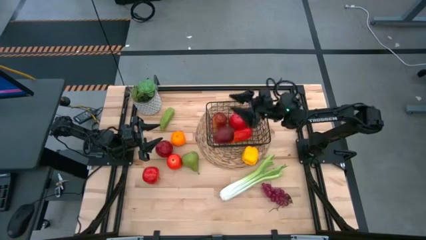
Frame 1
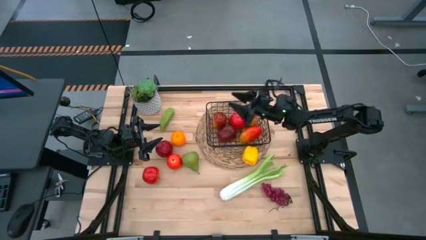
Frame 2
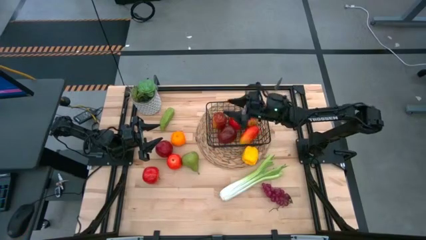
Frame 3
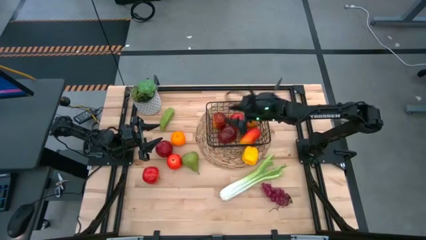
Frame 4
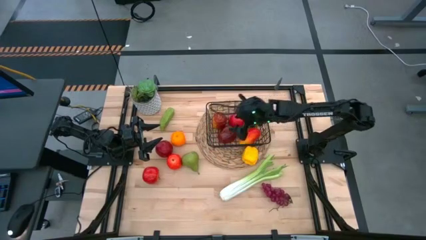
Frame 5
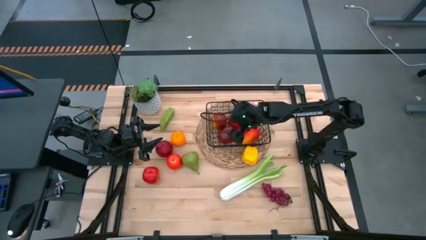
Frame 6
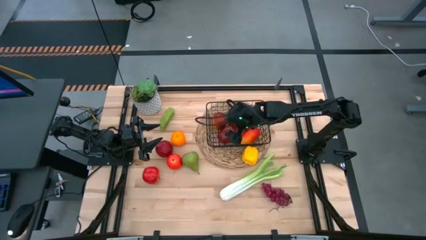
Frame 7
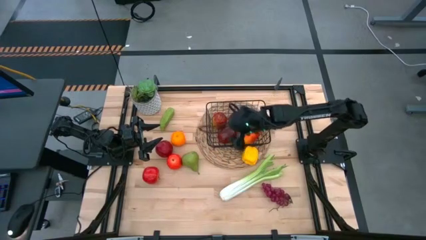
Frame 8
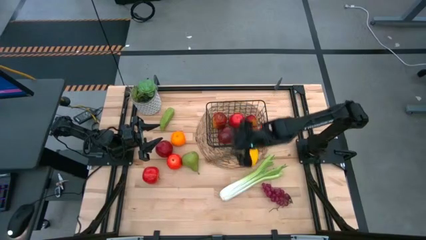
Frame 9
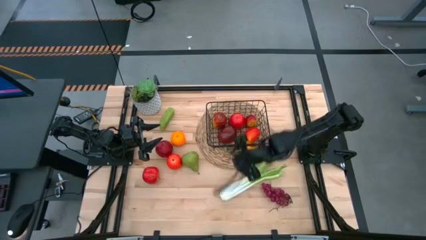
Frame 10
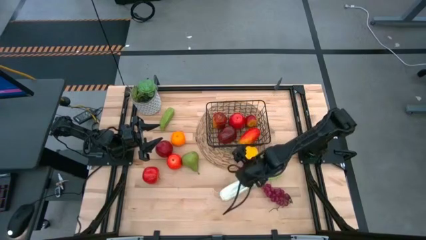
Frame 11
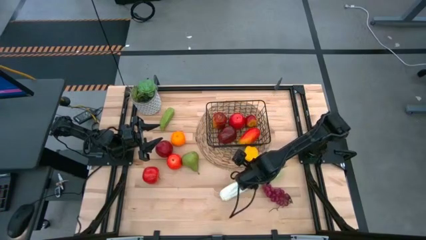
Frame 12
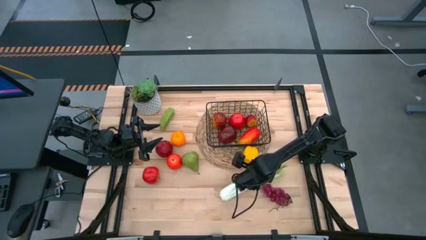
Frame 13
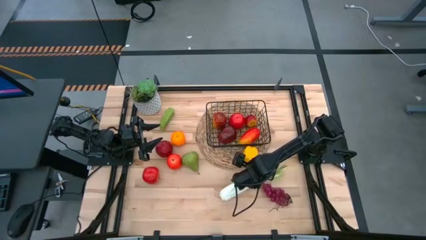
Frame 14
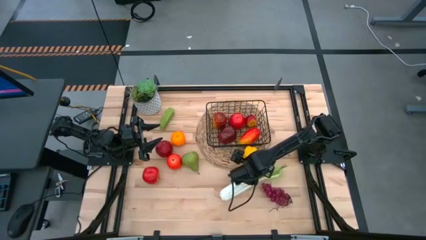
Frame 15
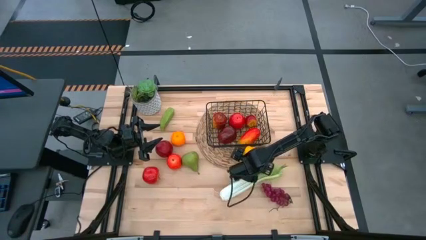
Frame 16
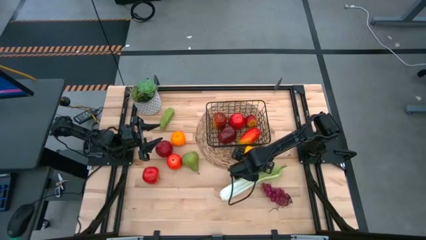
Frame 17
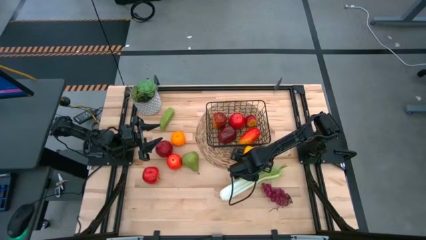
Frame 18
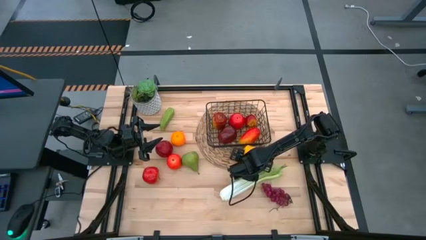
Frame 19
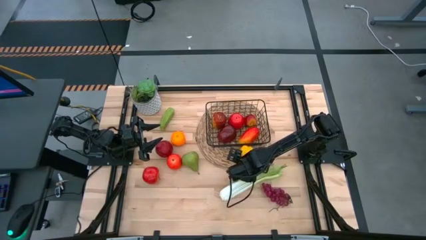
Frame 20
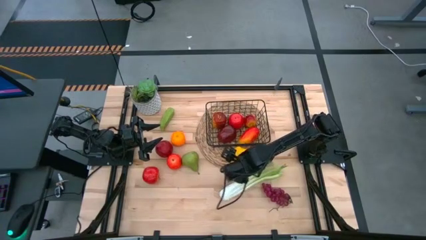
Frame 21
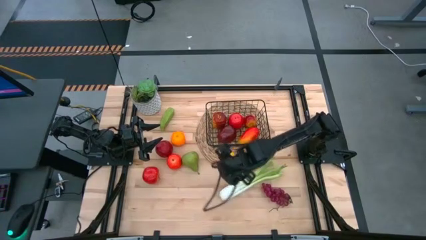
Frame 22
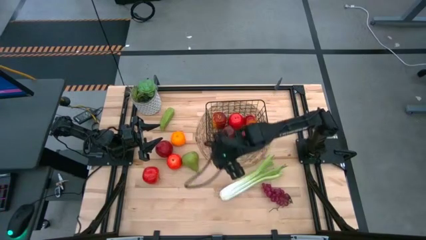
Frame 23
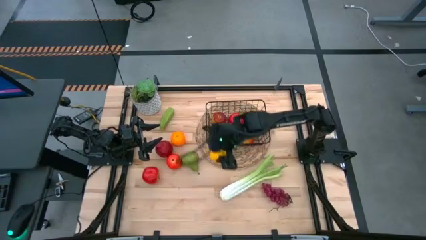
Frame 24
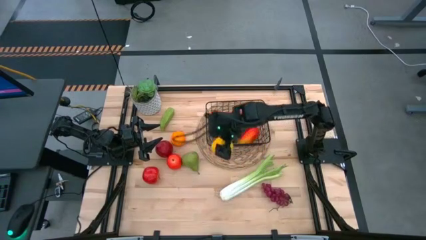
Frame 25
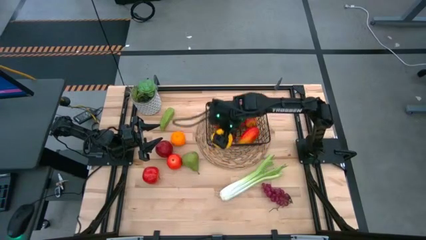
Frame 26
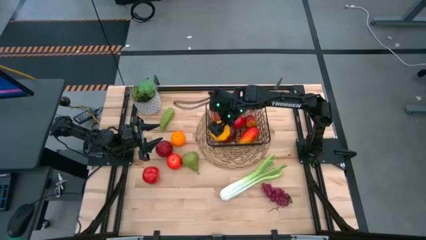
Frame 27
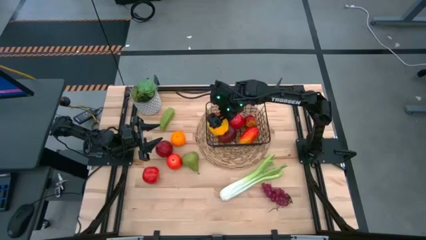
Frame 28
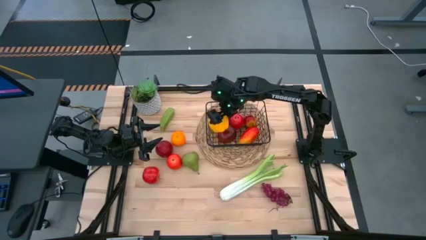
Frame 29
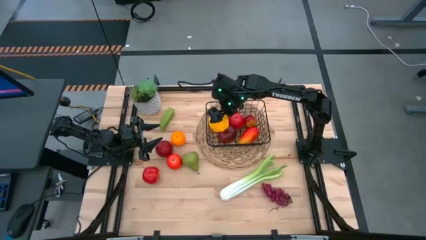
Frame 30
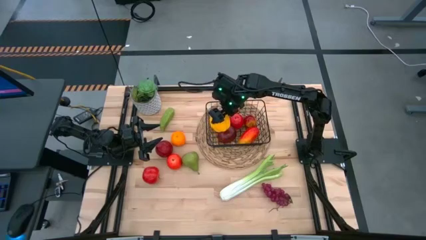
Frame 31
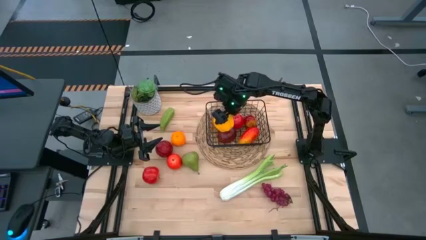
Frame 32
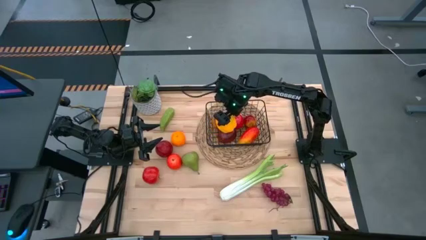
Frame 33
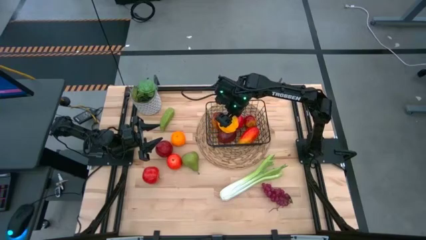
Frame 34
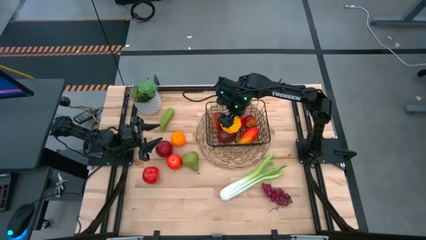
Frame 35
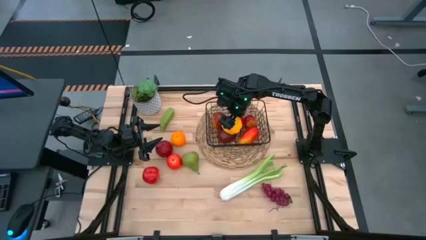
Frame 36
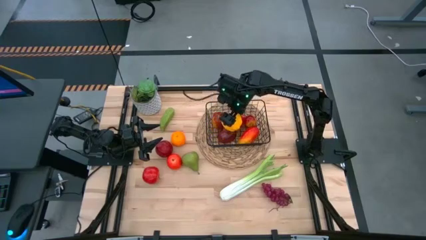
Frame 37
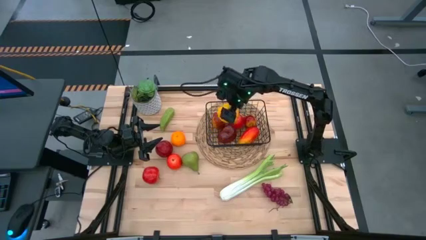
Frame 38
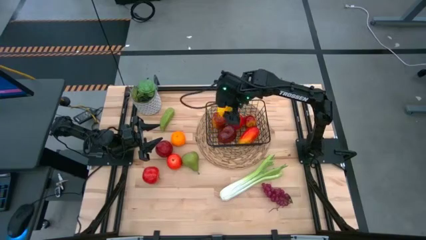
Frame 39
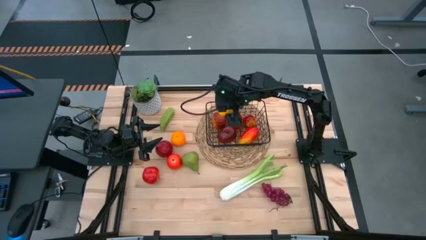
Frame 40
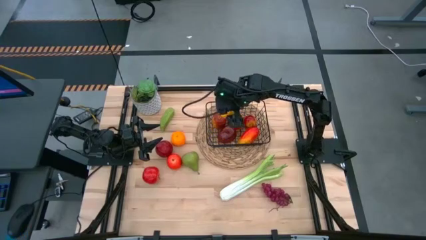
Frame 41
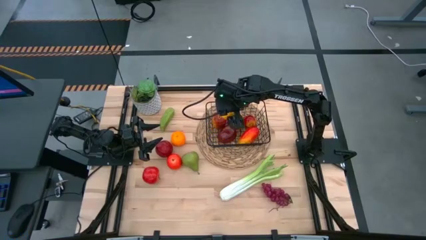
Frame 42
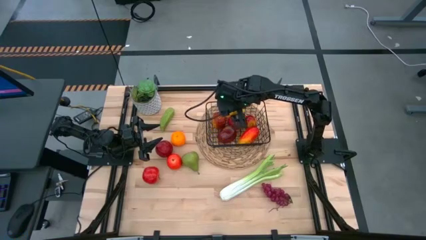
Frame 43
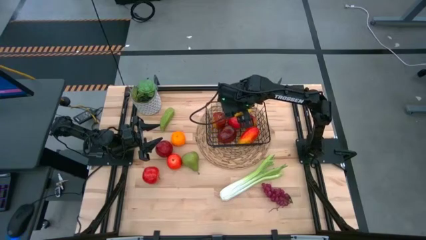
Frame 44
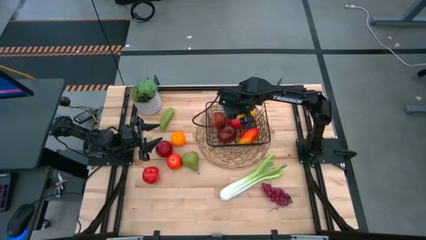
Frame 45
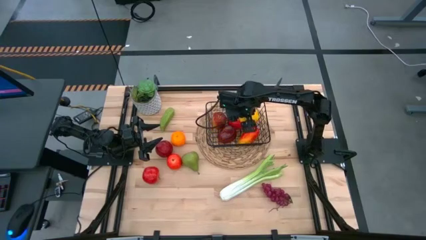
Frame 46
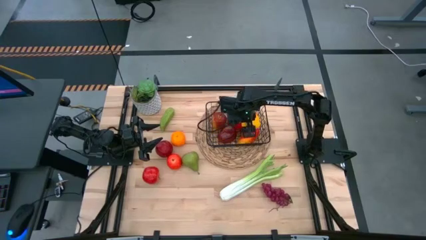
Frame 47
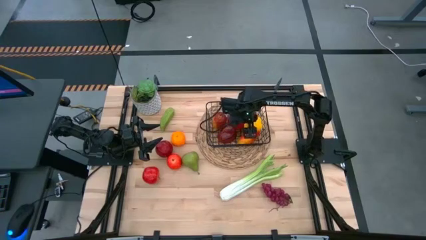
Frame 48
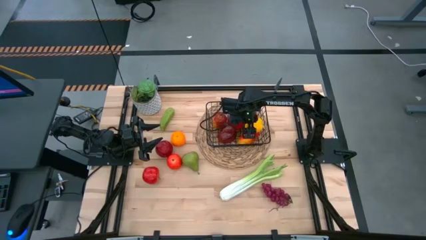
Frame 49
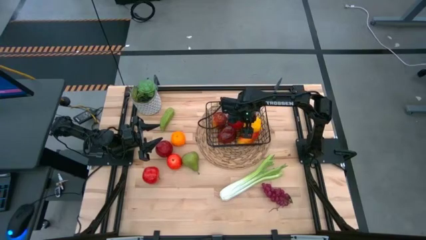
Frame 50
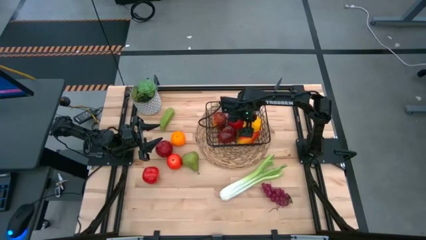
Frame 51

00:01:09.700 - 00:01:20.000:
Task: Build produce basket
Put the yellow pepper into the black wire basket

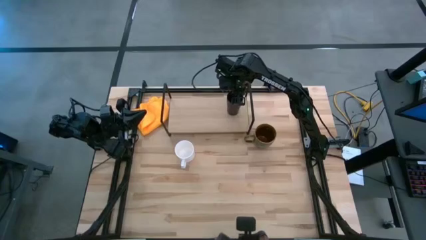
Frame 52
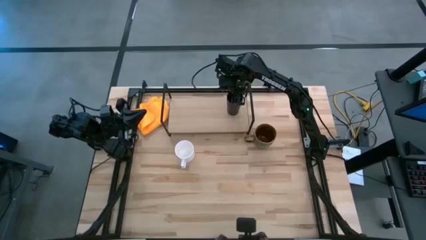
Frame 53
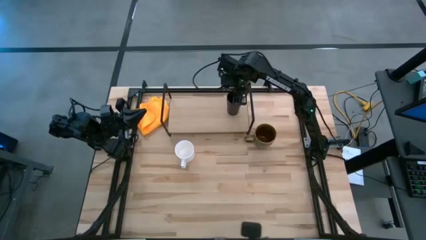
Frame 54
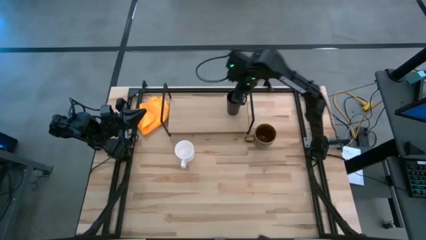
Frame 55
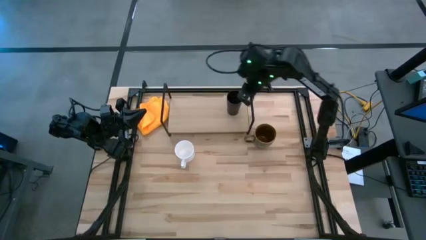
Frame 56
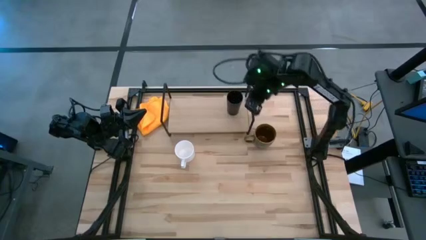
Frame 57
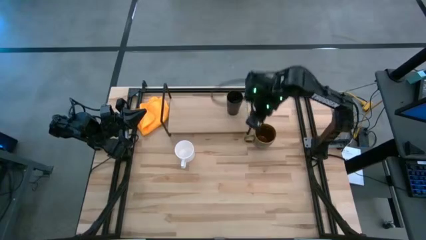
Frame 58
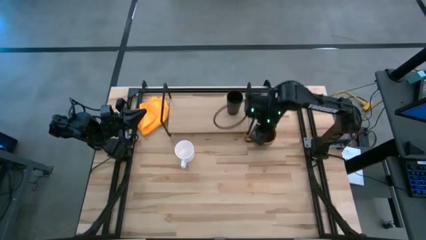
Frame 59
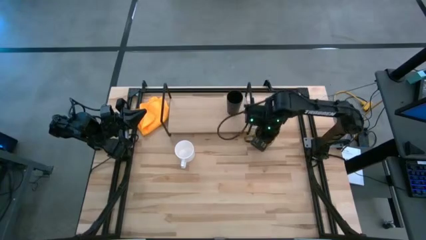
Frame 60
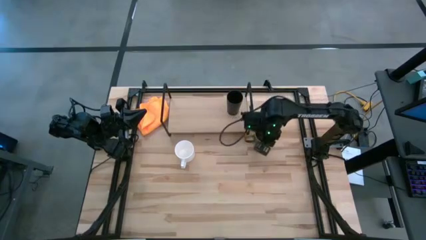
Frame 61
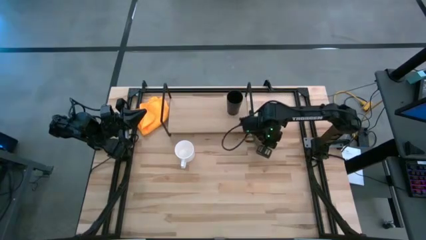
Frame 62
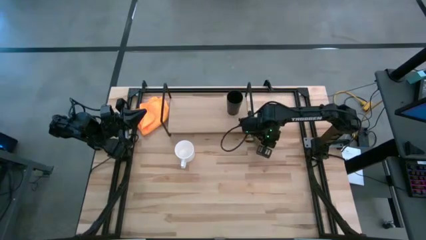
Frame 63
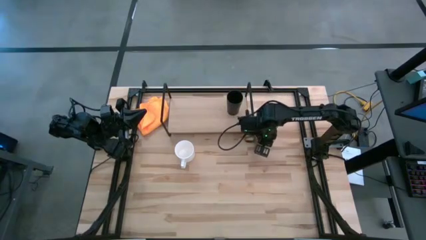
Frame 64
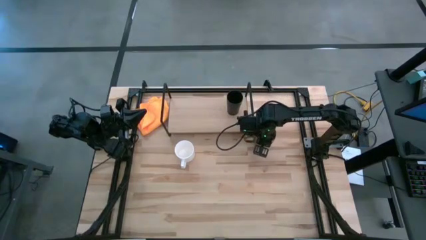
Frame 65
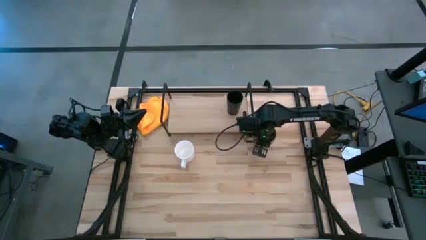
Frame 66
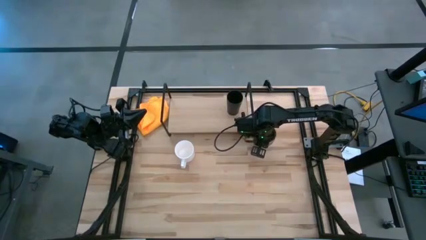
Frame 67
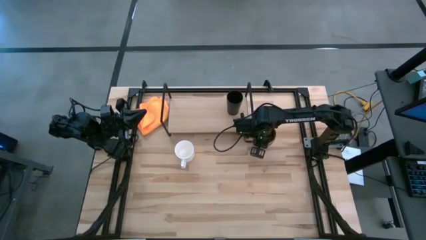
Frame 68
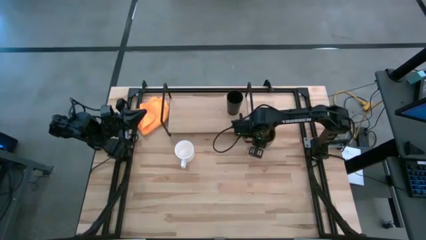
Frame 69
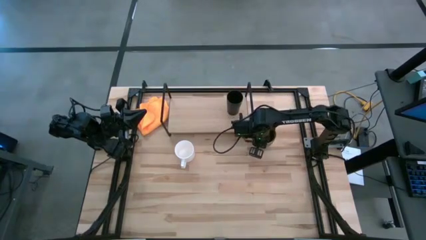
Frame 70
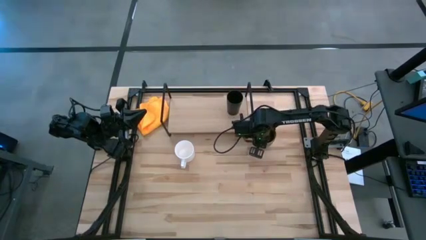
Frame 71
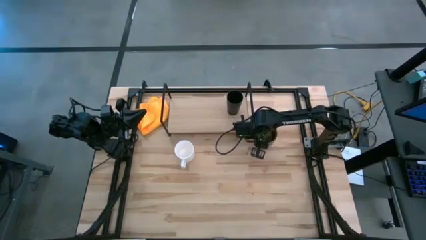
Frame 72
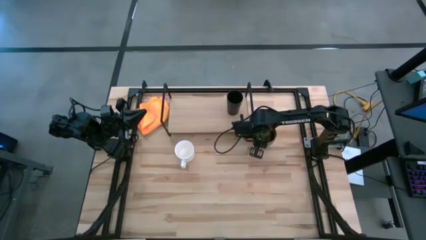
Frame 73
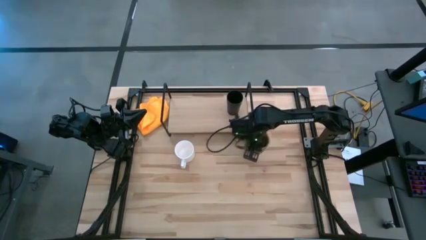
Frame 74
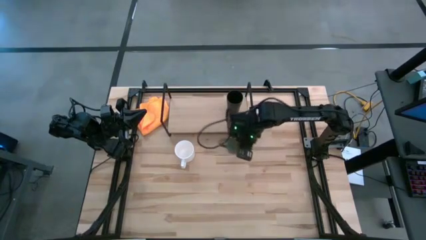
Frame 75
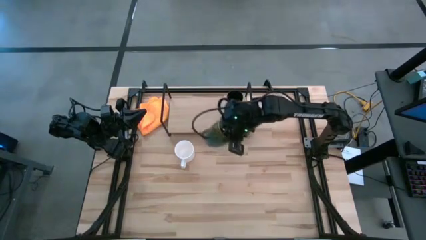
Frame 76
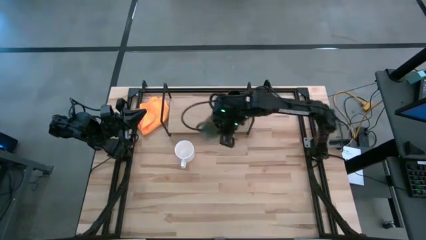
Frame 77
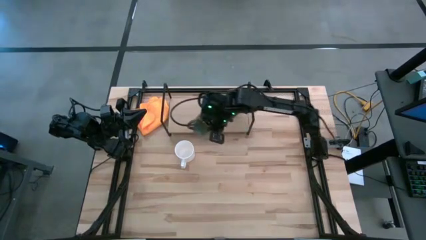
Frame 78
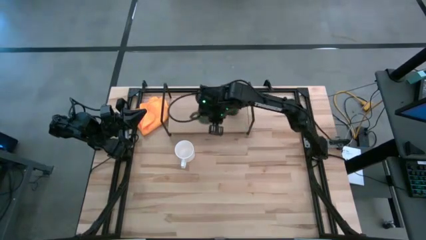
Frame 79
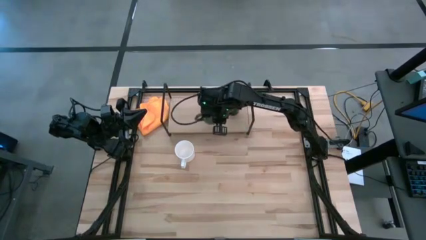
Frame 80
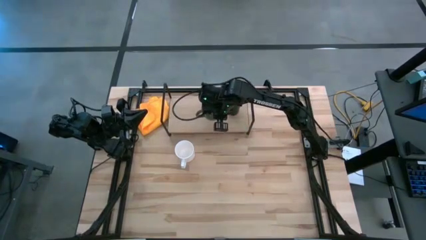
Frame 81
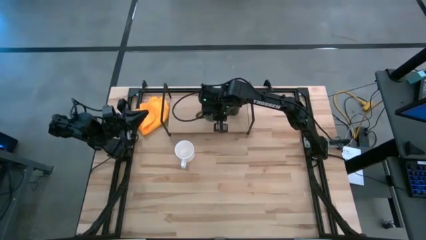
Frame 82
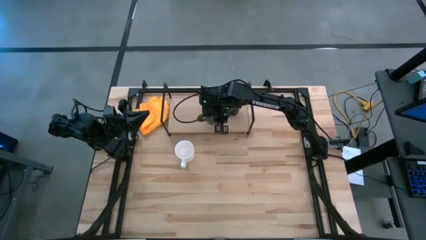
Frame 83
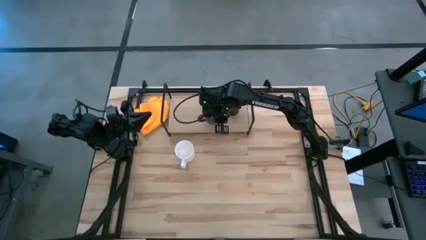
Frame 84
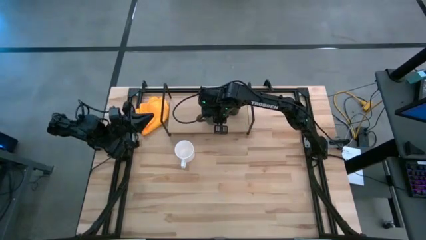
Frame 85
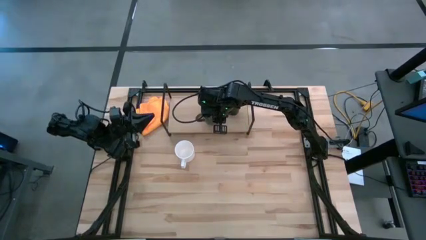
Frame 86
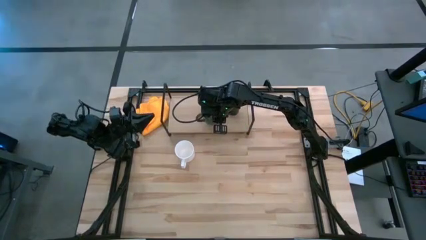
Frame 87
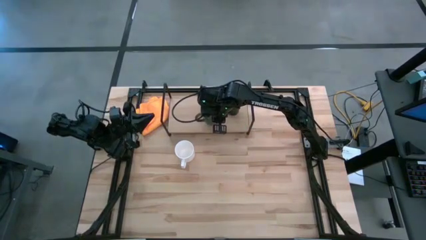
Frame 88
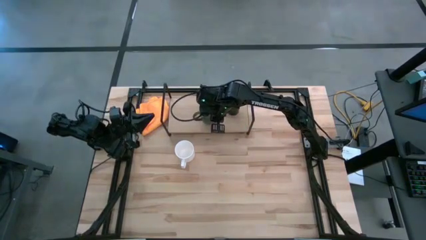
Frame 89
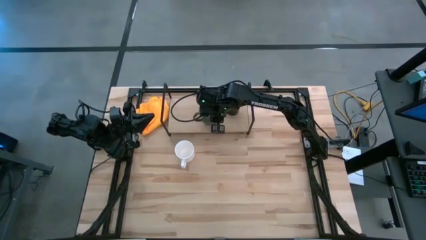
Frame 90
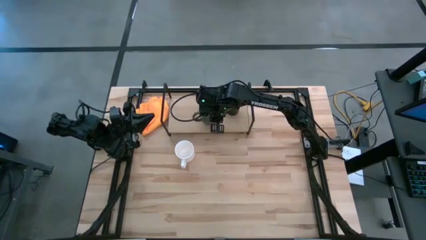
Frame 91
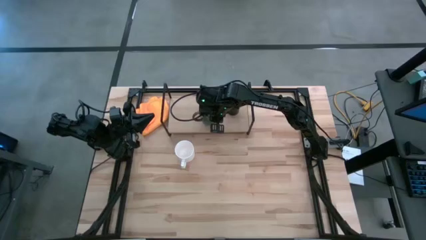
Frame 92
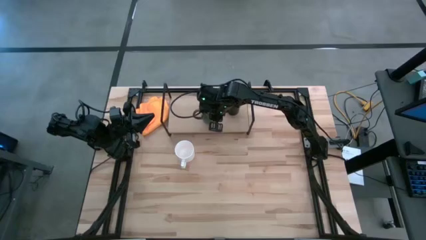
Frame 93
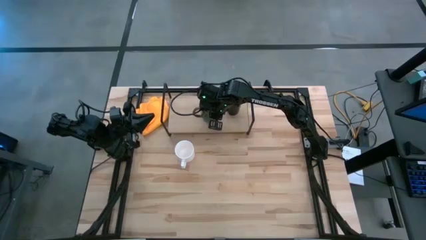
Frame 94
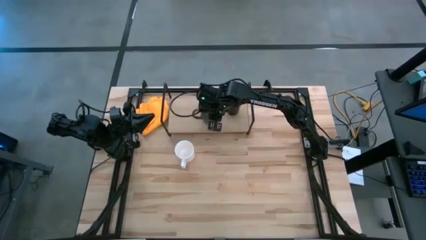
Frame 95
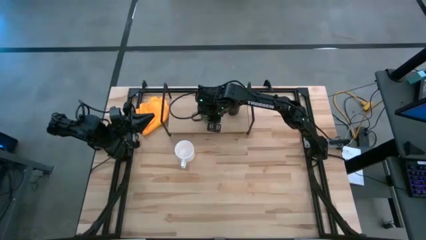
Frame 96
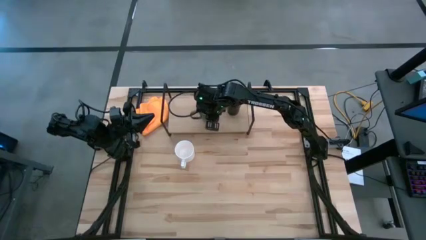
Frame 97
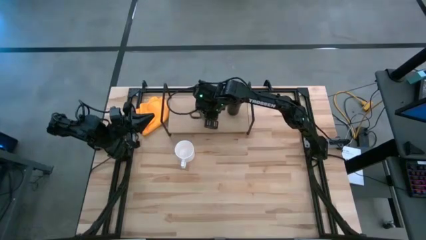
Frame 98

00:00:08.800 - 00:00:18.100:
Task: Stack small to large cups/mugs on shelf
Put the brown mug on the shelf
